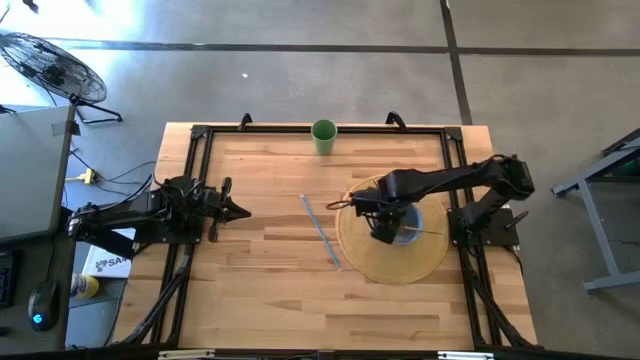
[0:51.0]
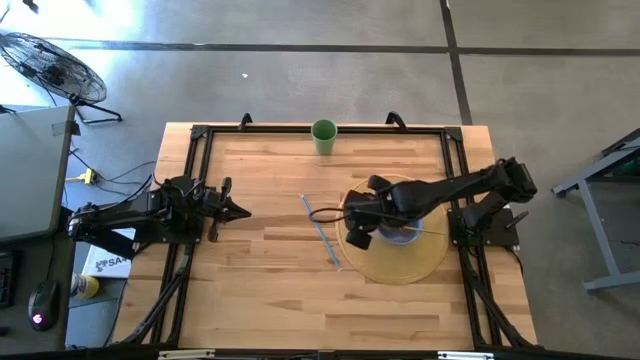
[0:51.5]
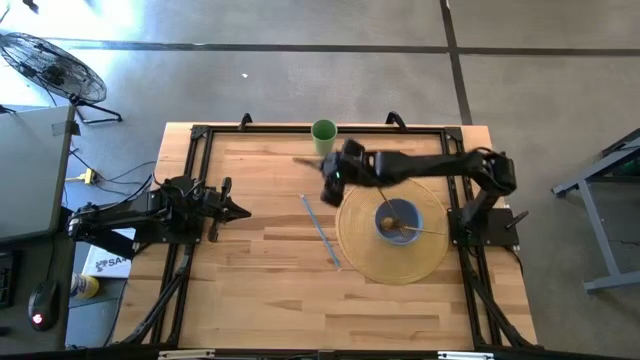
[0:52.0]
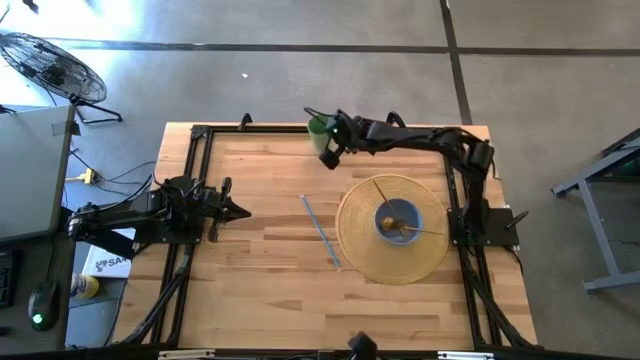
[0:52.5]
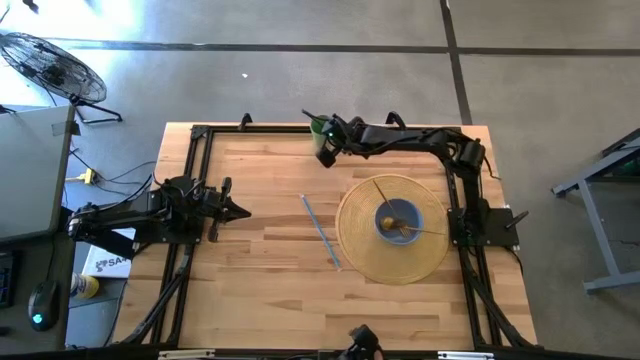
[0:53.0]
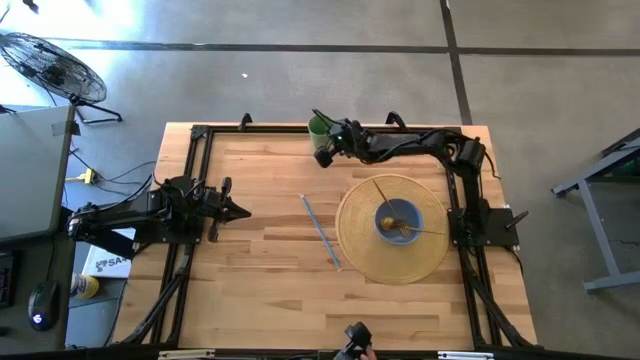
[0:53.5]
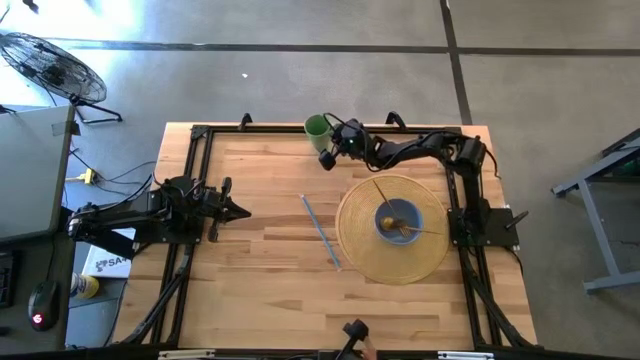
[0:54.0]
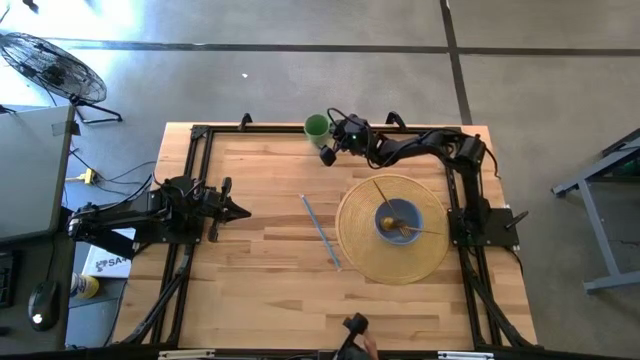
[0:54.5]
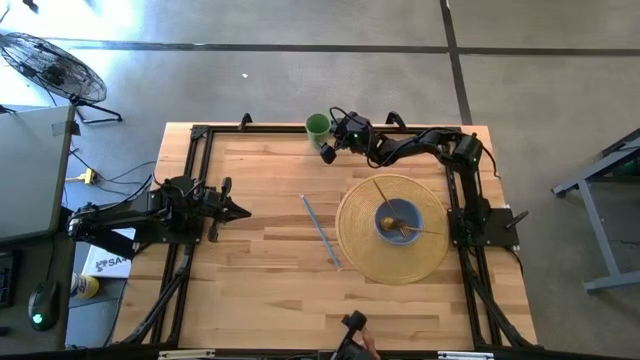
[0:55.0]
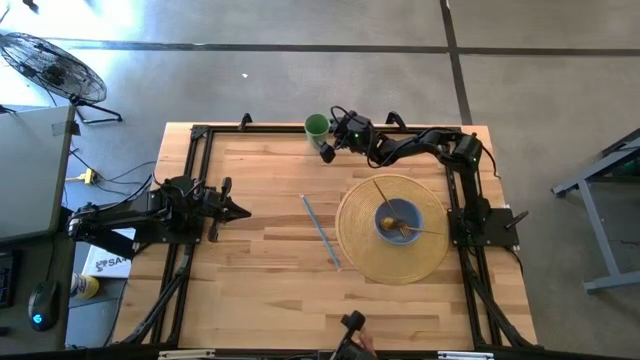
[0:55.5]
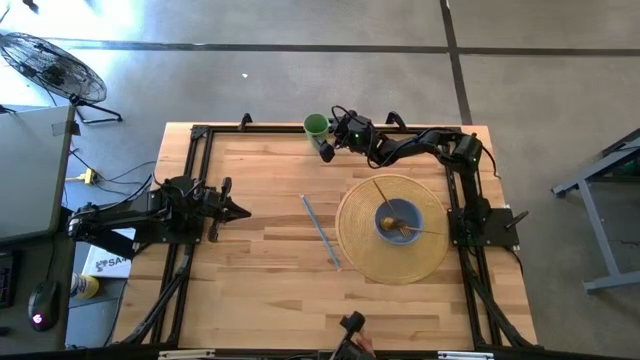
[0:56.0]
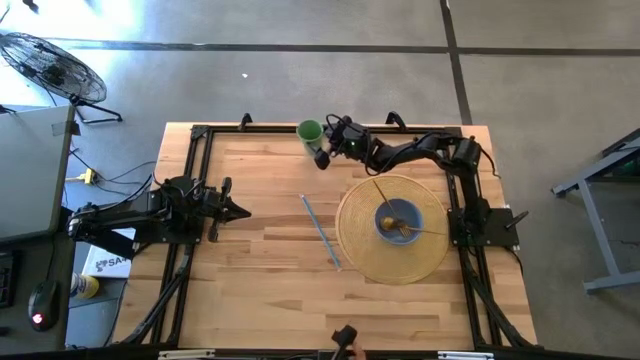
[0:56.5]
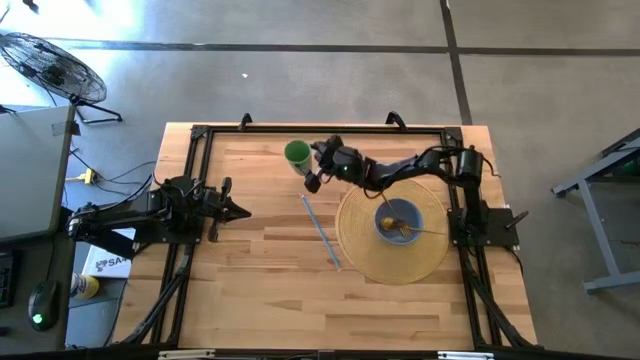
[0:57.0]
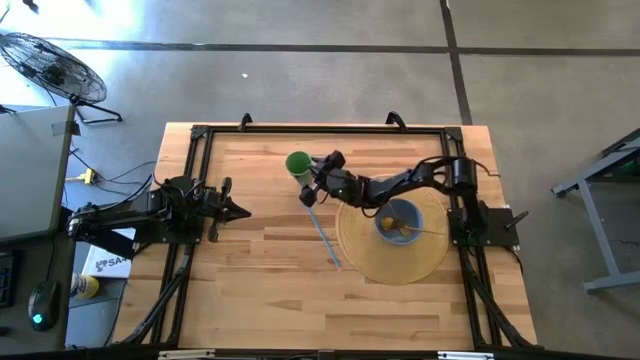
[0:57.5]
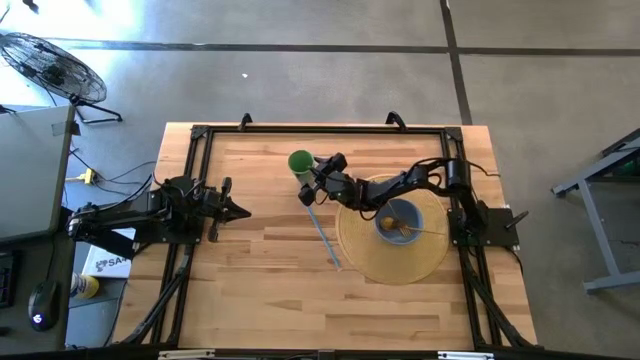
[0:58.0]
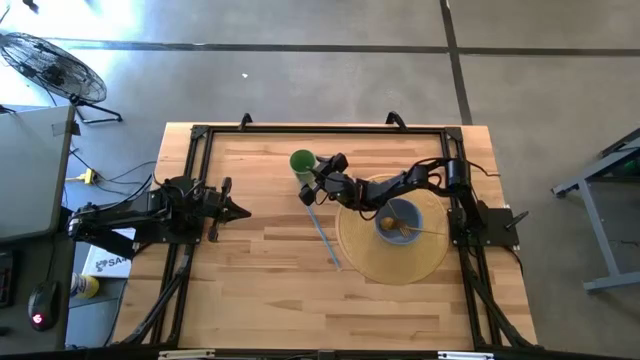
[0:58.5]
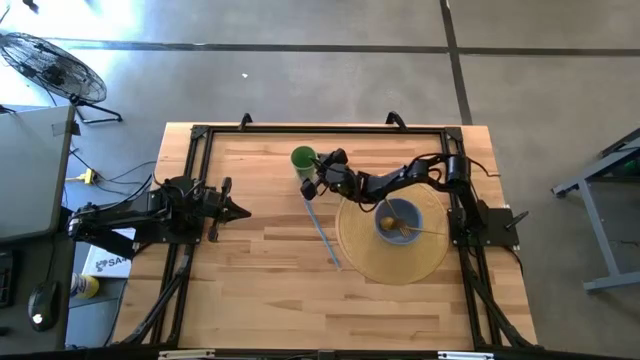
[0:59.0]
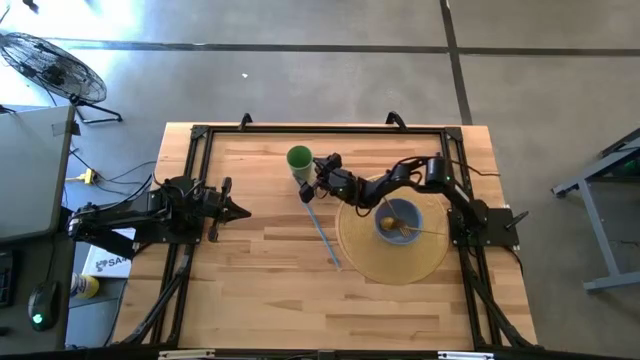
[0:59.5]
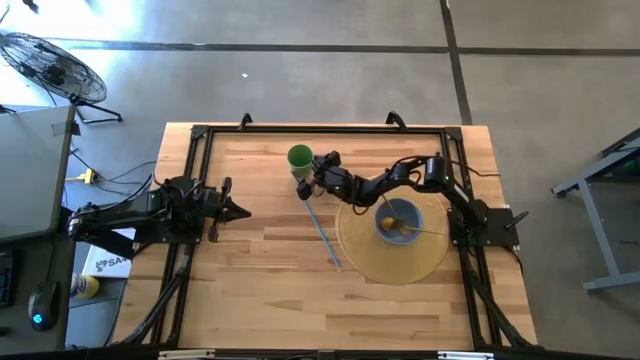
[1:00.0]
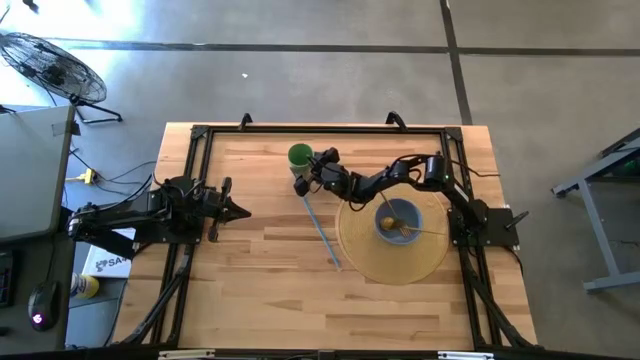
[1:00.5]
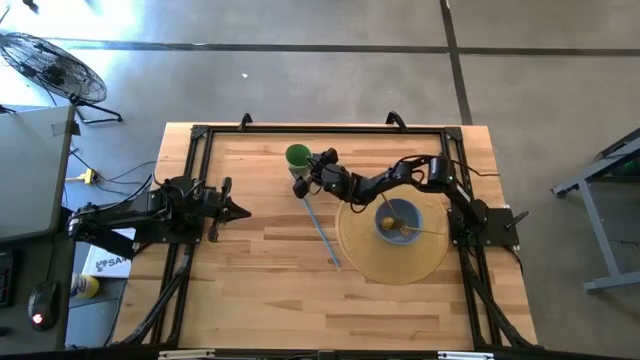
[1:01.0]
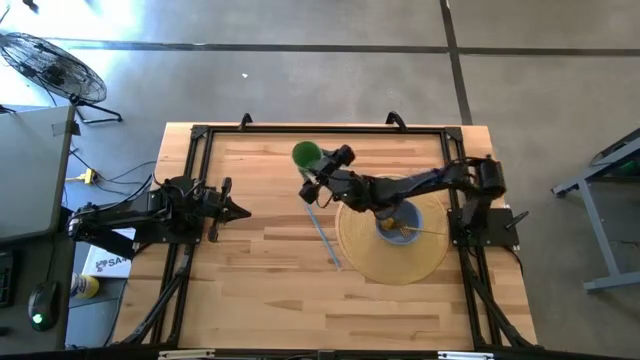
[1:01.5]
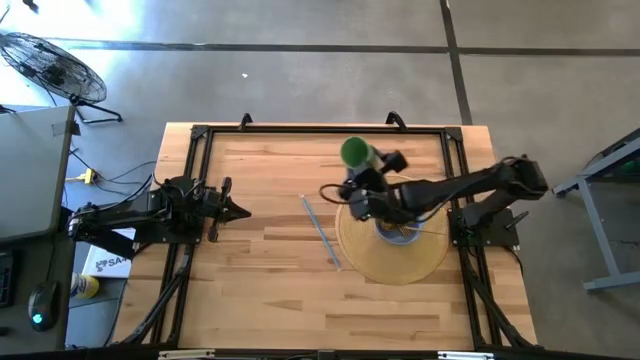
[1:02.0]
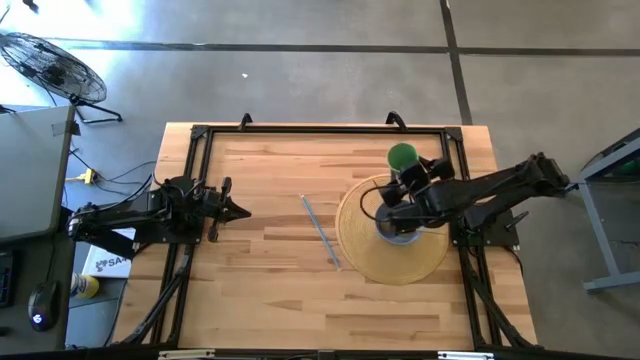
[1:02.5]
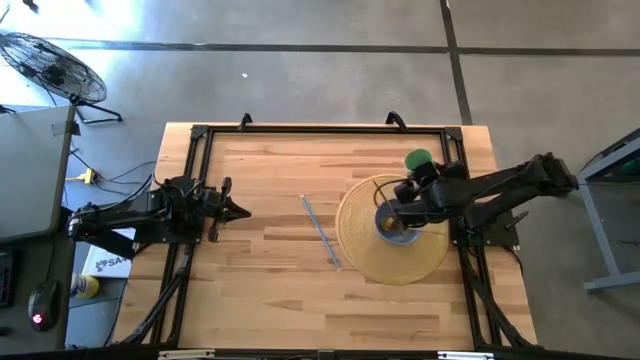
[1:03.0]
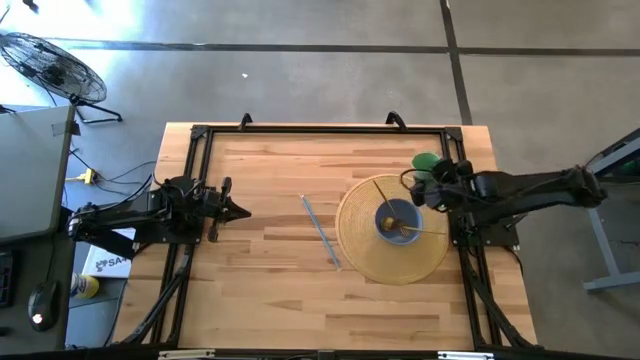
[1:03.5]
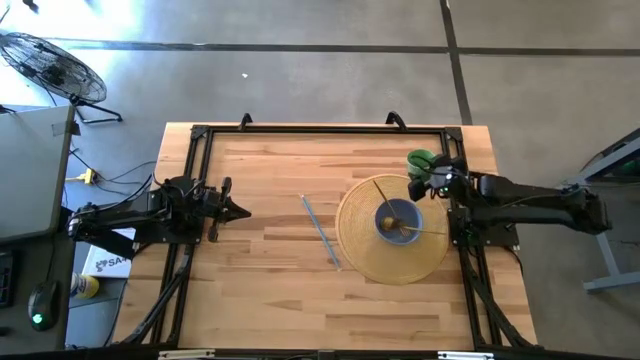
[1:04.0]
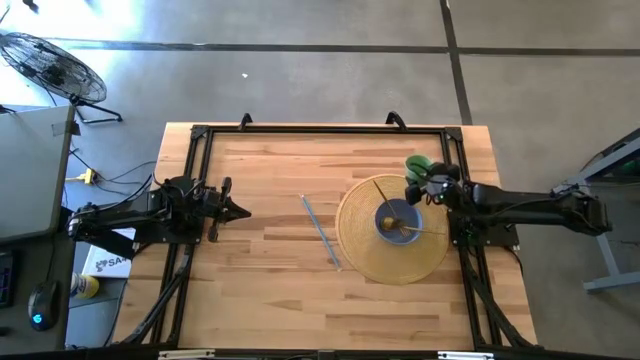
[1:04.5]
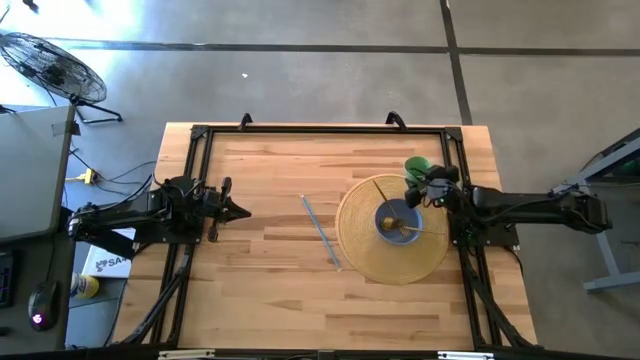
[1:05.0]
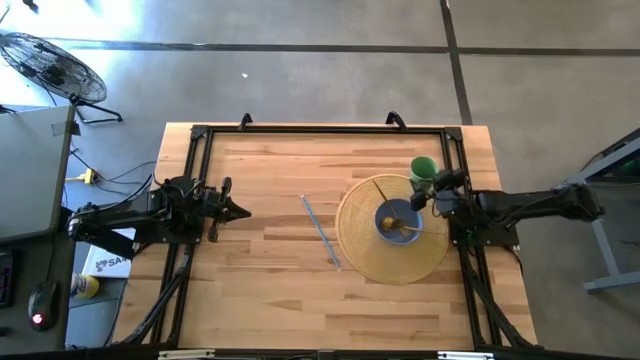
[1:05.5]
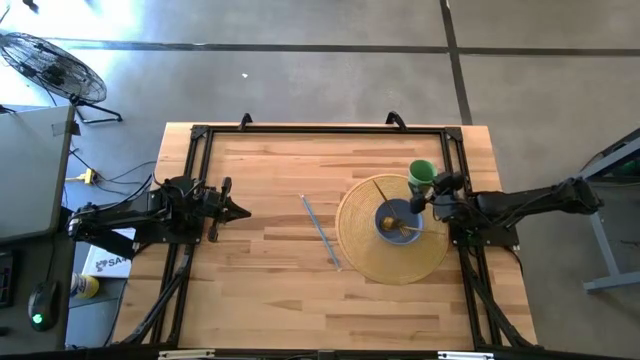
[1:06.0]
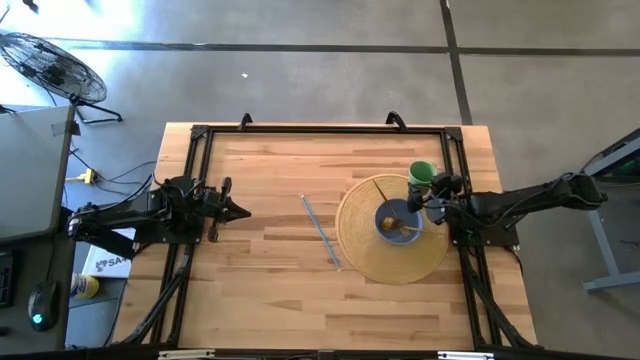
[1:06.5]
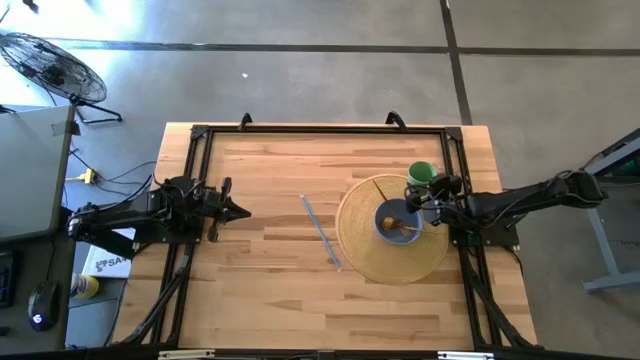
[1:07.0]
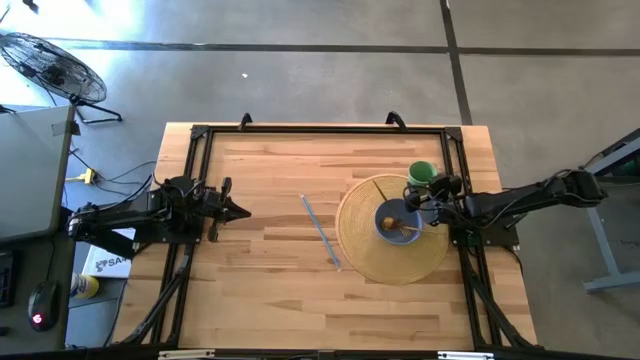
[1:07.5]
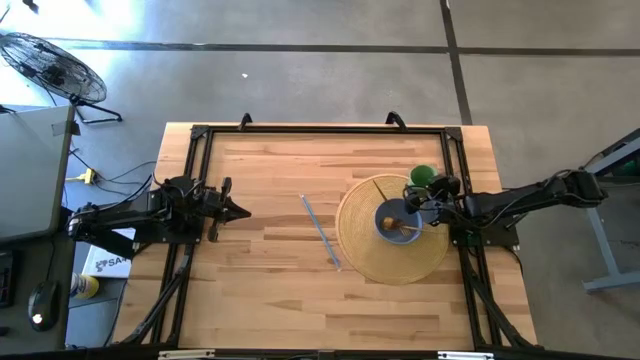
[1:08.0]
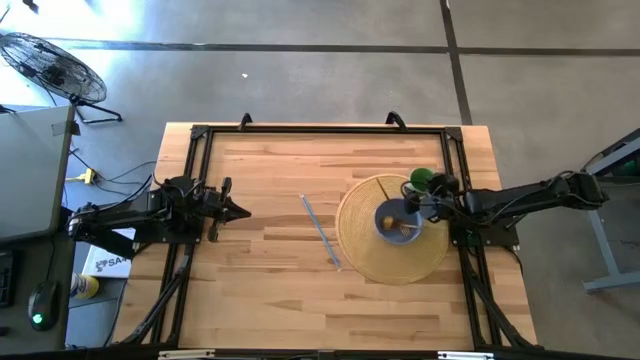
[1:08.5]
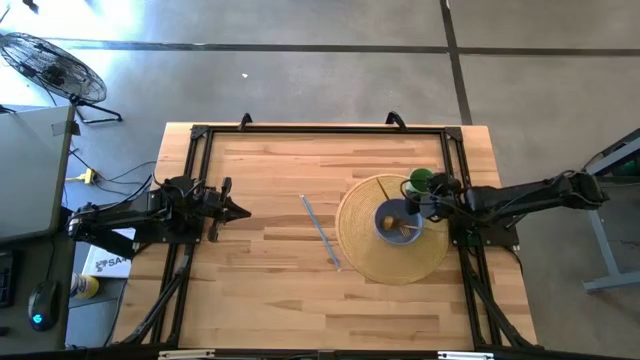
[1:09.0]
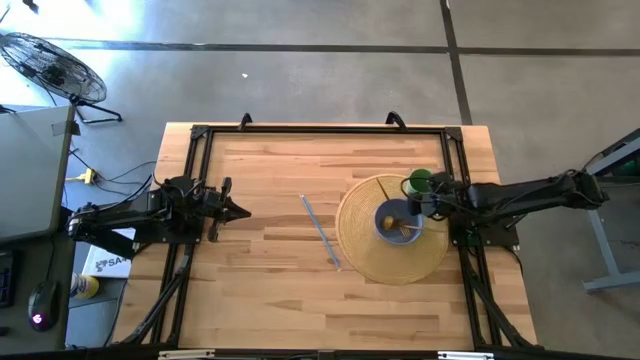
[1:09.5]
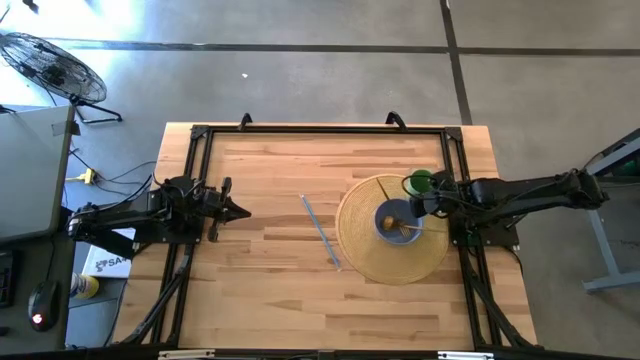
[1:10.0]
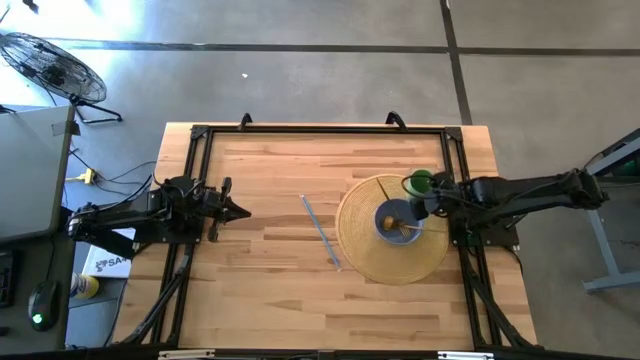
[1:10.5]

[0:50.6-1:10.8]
Task: Pick & Place Utensil
Put the green cup on the brown mat to the top right of the blue bowl

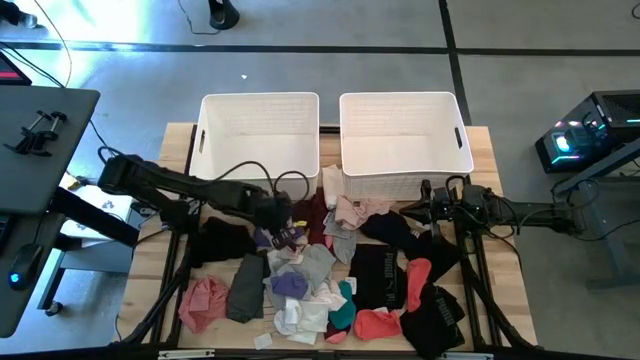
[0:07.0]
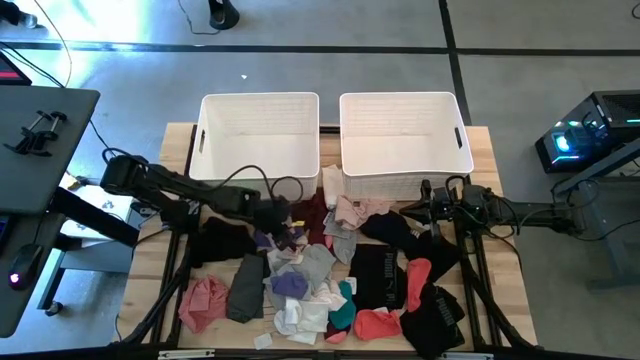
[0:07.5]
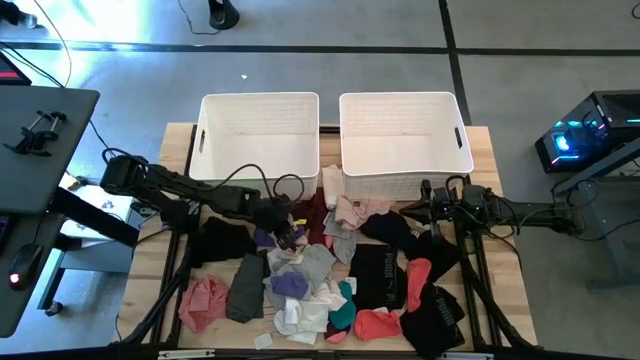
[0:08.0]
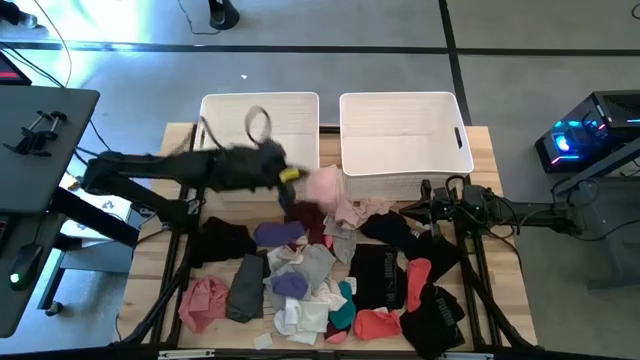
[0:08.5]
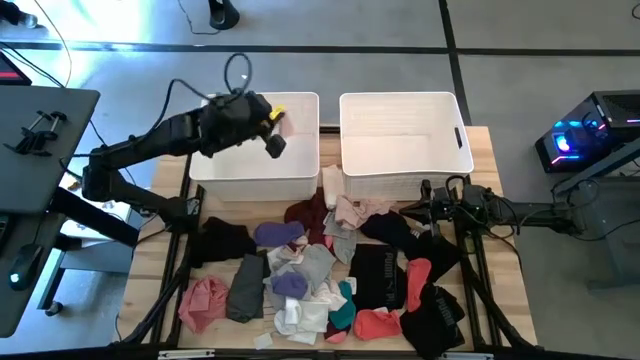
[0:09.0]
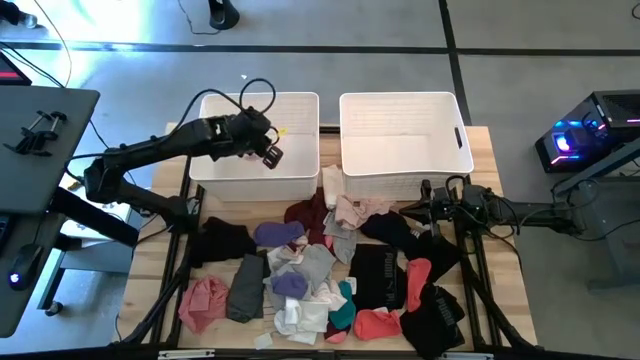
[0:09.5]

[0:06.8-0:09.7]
Task: Sort clothes
Put the pink sock into the left white laundry bin
